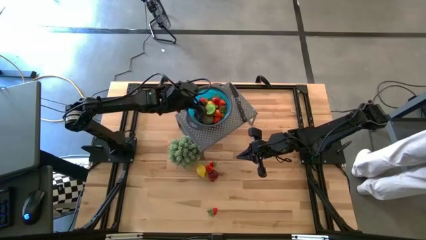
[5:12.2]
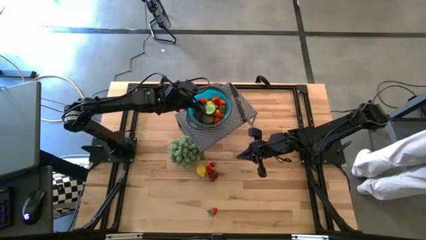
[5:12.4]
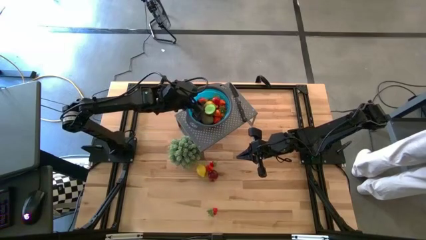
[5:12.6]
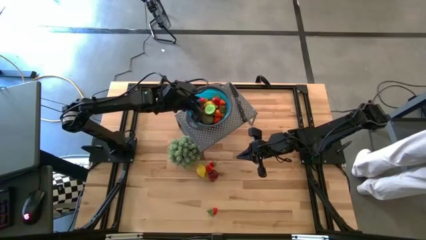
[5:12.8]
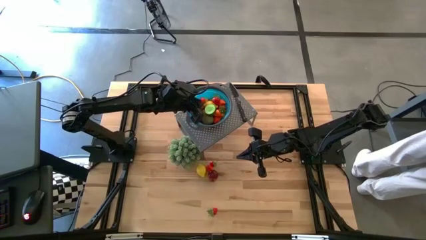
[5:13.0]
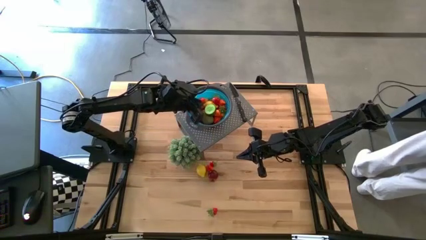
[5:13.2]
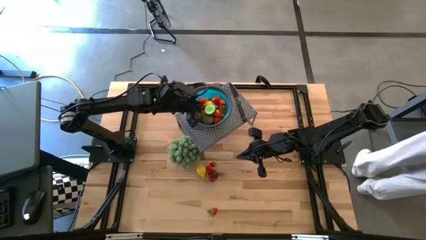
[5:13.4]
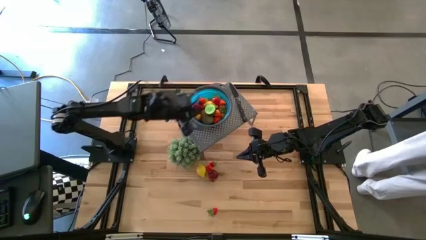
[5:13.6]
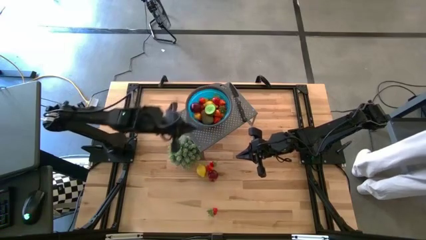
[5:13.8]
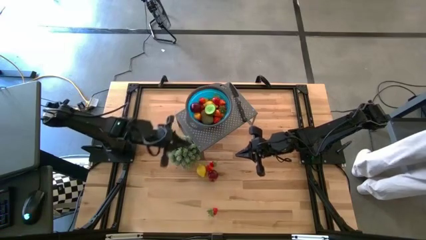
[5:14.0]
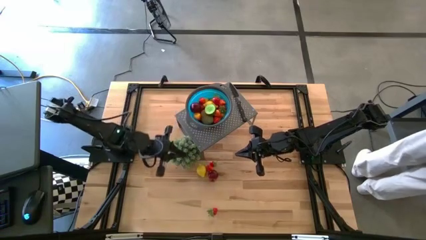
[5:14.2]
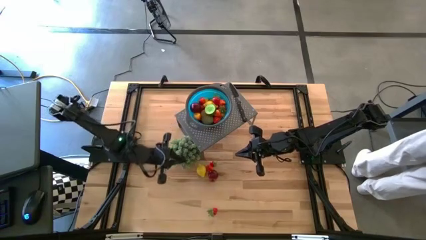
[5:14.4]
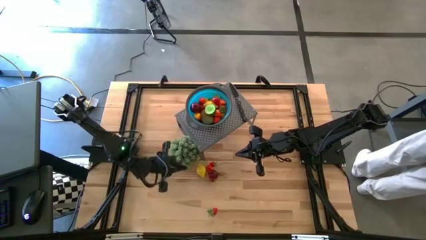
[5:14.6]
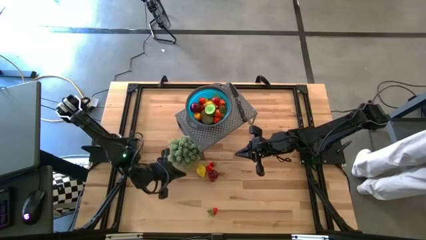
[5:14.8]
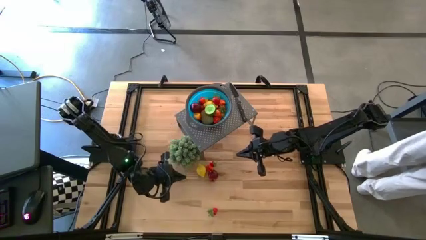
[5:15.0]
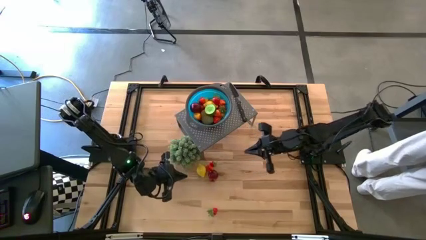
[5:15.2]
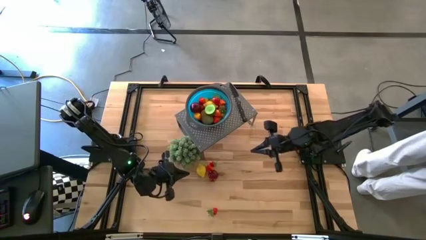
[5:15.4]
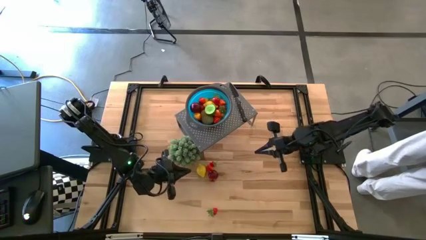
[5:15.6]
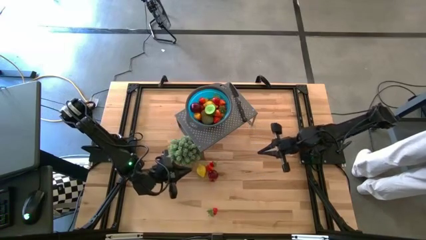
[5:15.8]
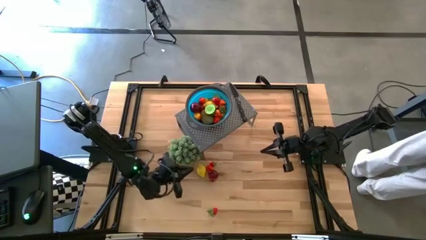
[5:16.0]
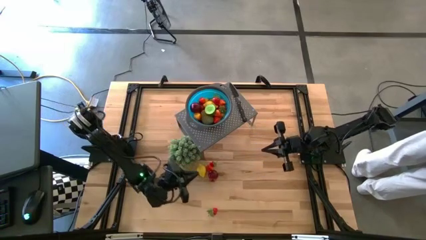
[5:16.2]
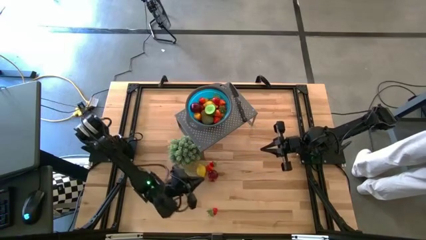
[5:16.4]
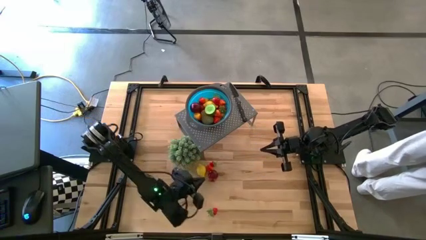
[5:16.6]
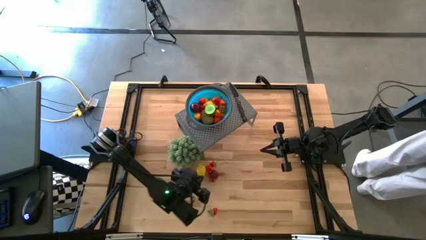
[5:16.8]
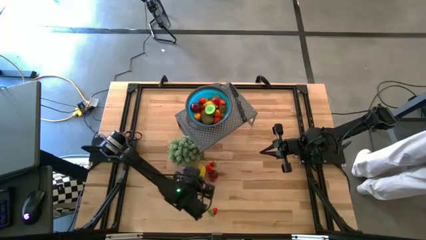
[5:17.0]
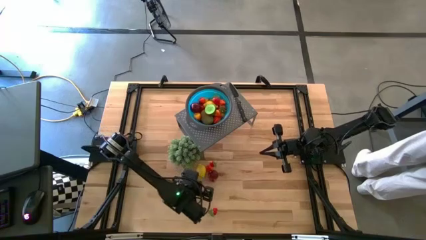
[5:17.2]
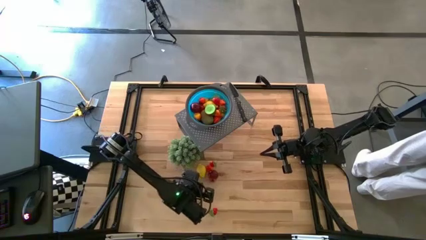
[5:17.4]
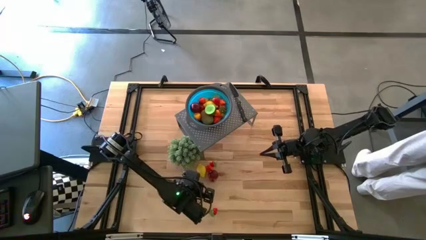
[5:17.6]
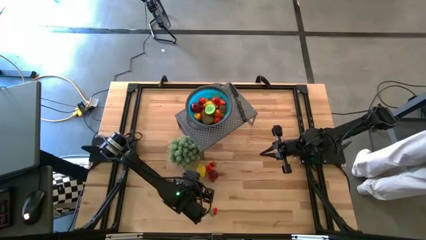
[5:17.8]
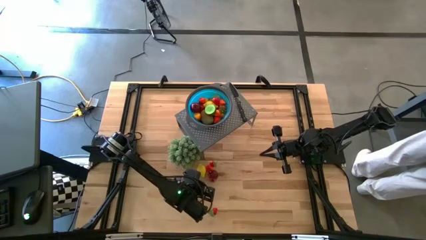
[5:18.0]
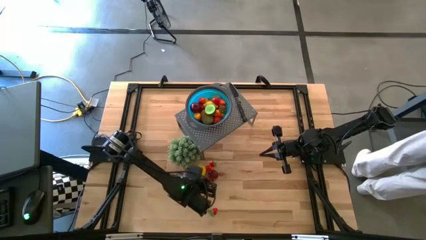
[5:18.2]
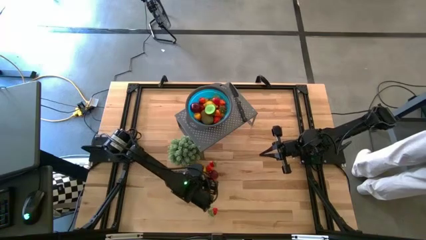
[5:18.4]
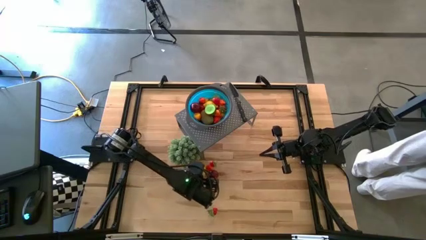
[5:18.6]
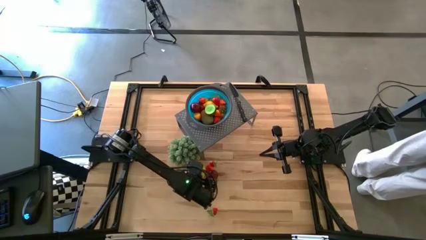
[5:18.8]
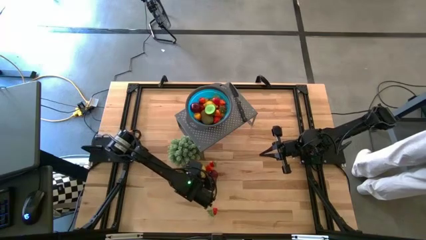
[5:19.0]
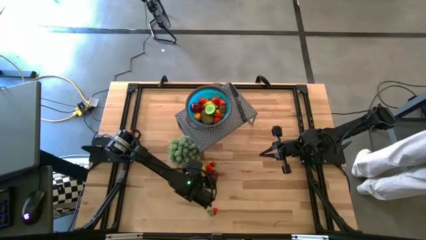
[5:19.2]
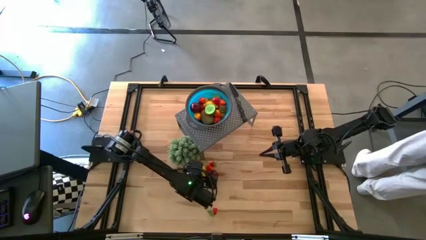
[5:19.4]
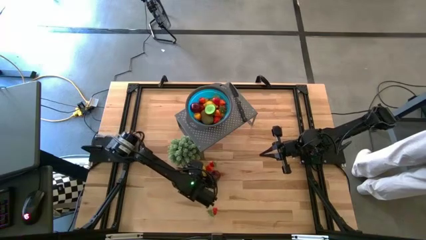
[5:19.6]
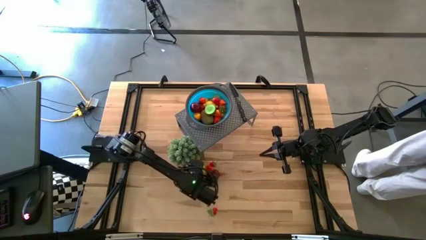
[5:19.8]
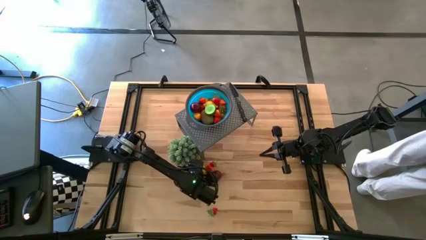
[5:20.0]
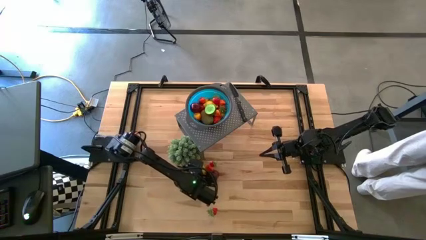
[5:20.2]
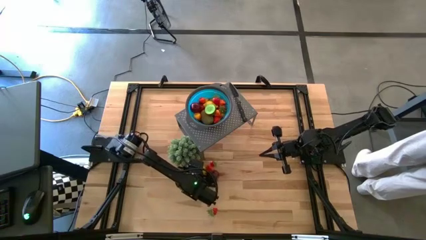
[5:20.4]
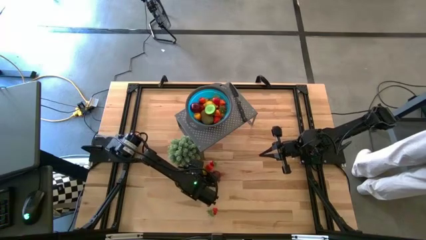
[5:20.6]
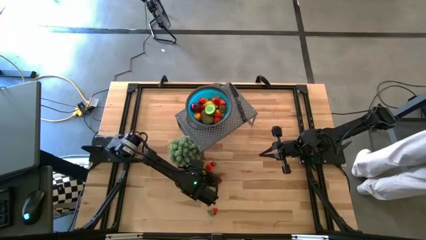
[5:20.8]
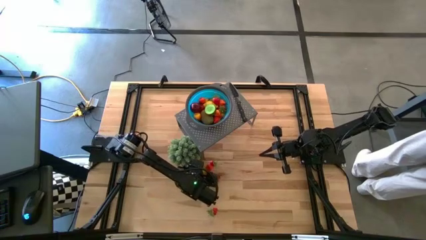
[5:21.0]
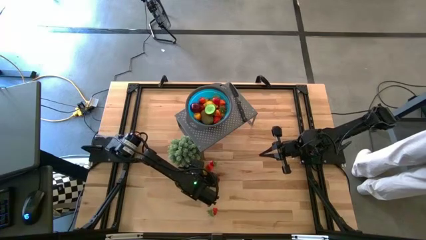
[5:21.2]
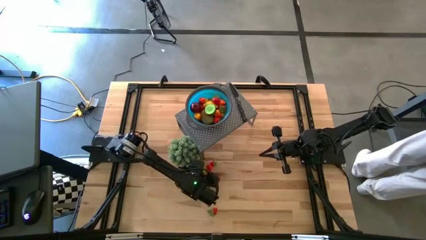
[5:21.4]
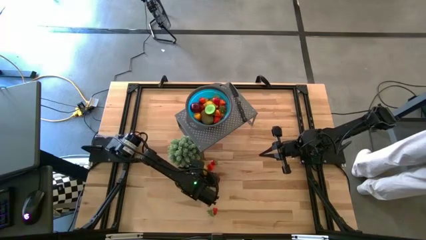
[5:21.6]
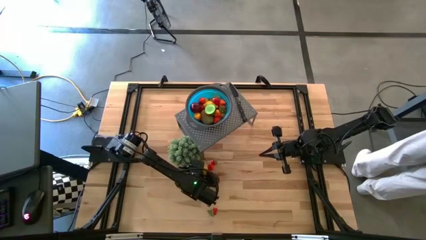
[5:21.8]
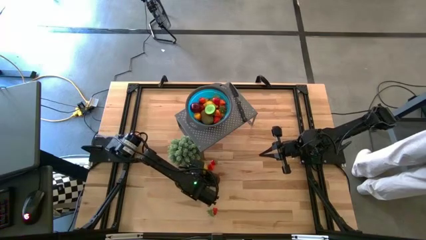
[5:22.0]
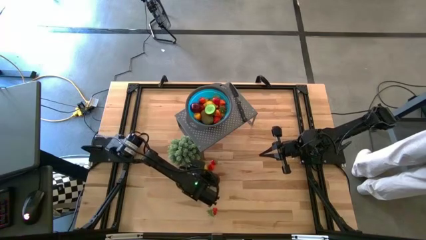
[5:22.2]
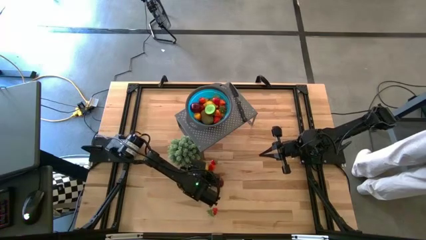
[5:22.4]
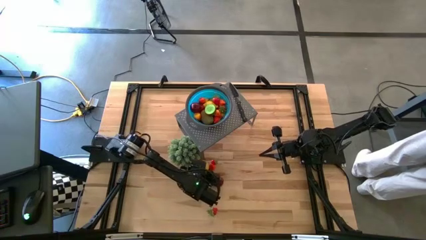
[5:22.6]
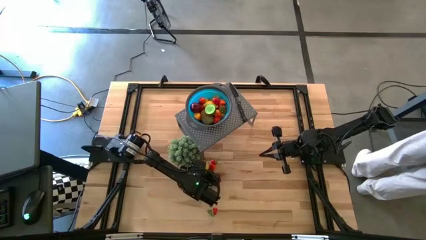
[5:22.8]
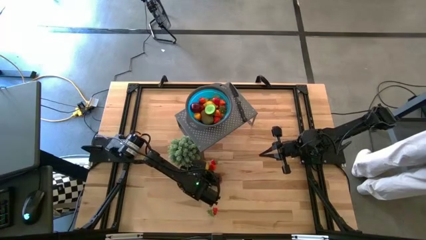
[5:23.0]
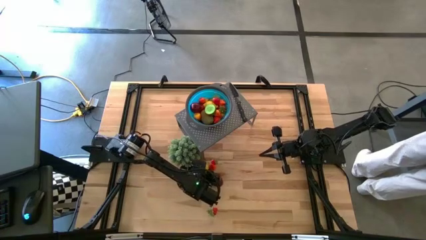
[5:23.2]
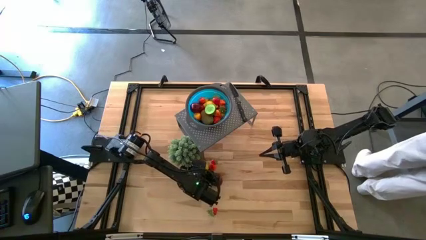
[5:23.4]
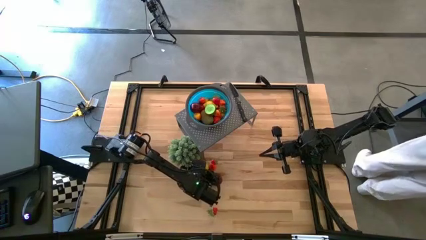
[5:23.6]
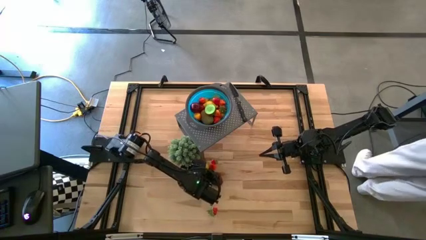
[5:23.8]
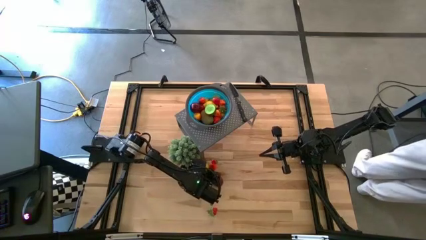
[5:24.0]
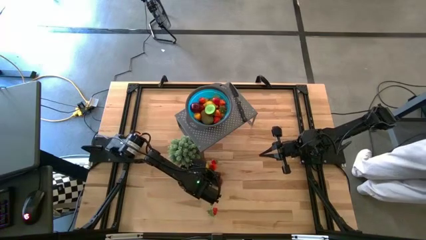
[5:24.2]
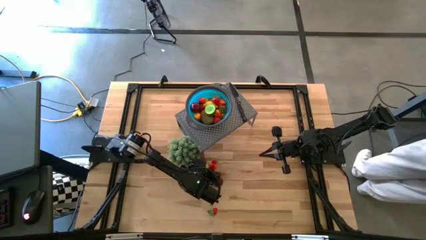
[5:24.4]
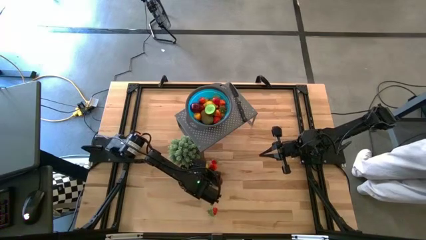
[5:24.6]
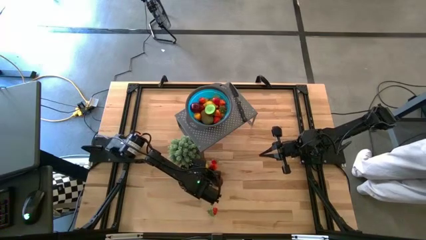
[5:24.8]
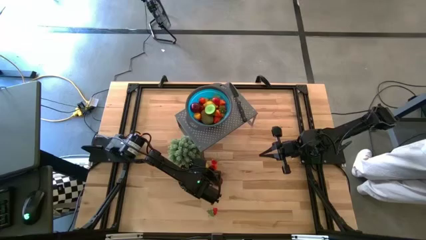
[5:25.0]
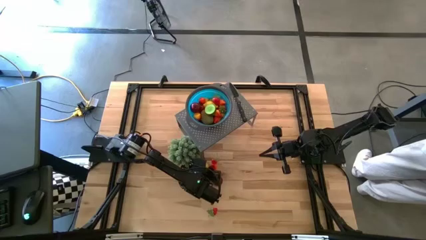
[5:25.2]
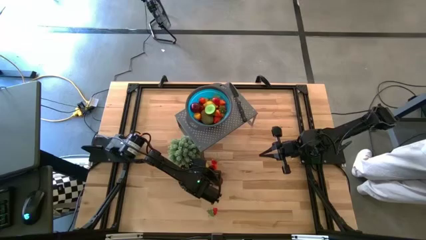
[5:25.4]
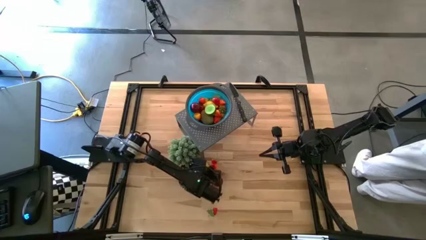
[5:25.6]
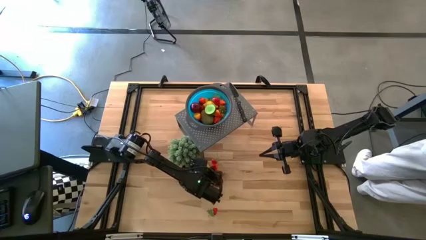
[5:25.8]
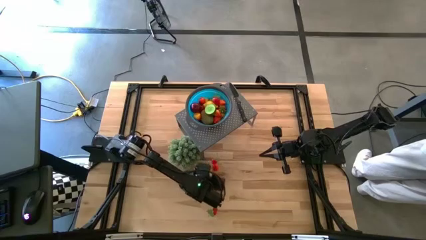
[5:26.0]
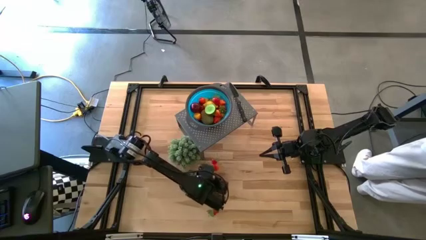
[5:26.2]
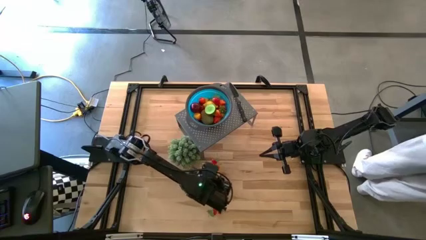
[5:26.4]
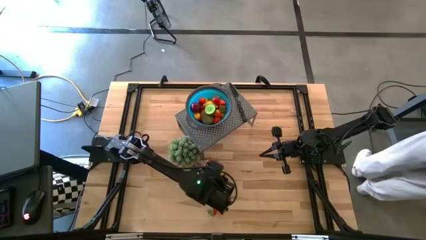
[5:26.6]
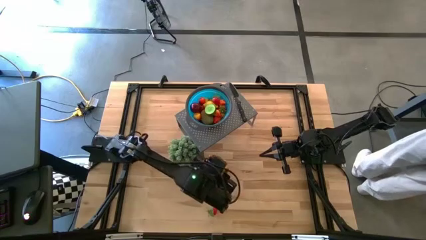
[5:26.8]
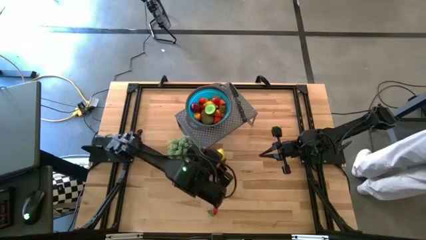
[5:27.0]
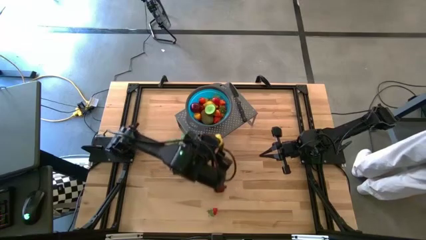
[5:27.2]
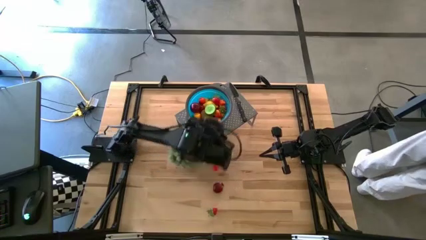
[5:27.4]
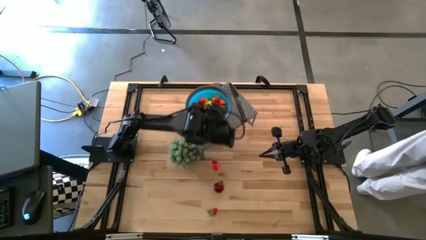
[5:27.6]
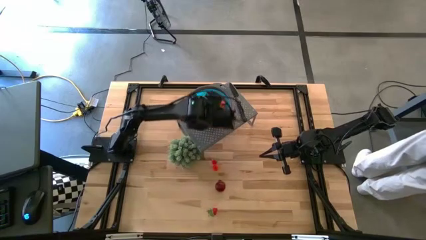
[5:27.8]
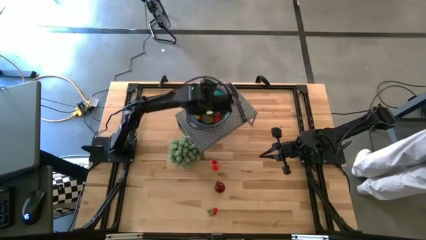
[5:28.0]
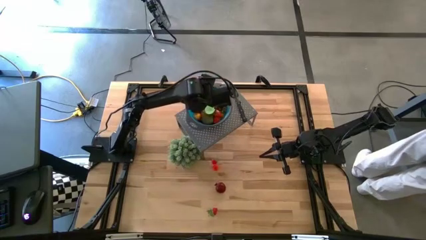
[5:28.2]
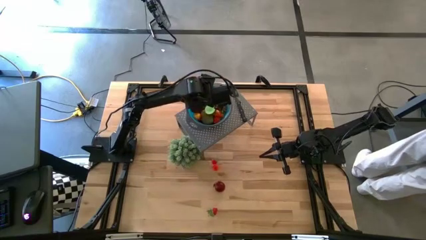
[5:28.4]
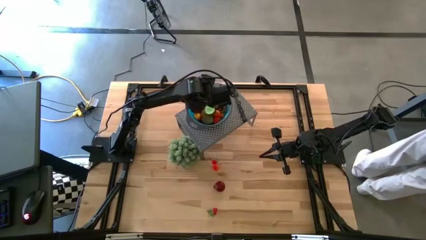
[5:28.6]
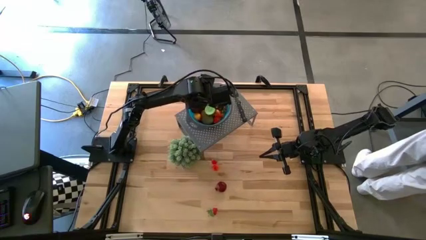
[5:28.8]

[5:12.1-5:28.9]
Task: Pick & Place Fruit
Put the lemon into the blue strainer bowl on the shelf
